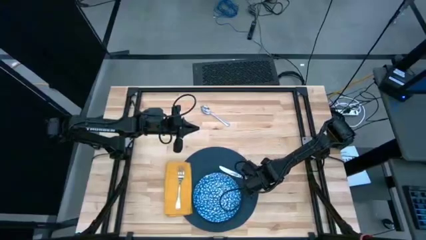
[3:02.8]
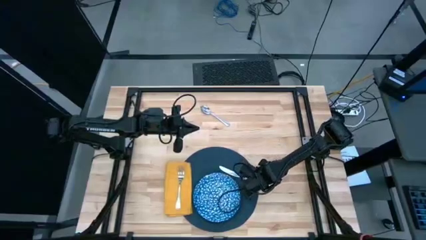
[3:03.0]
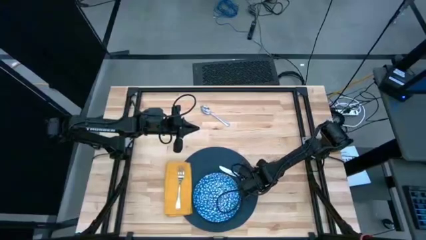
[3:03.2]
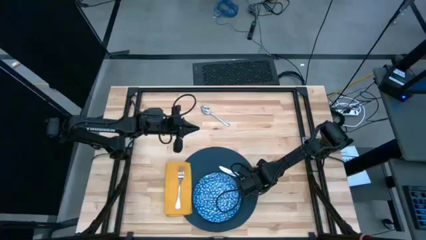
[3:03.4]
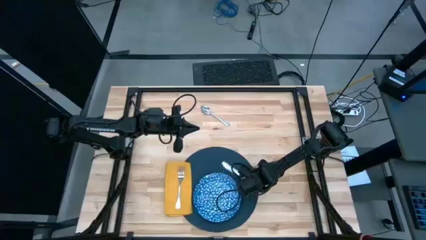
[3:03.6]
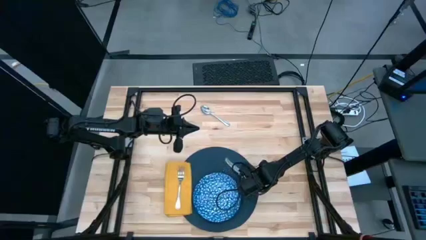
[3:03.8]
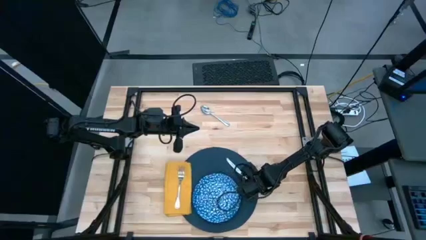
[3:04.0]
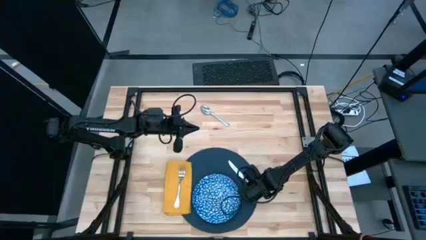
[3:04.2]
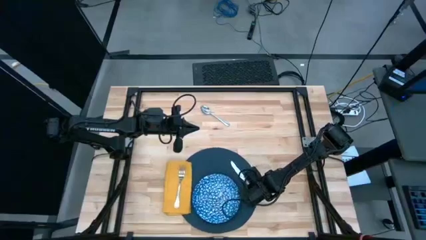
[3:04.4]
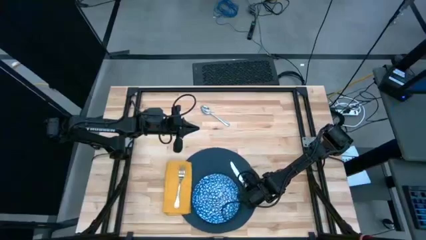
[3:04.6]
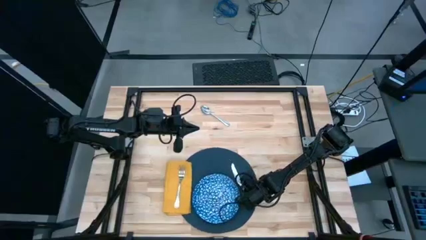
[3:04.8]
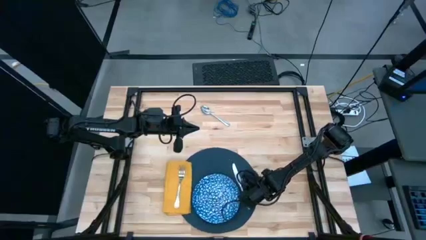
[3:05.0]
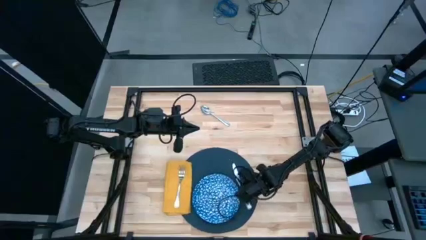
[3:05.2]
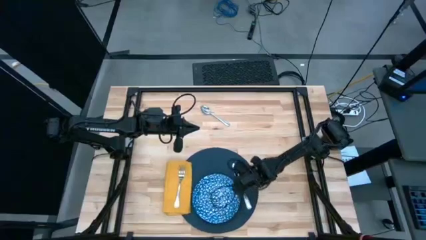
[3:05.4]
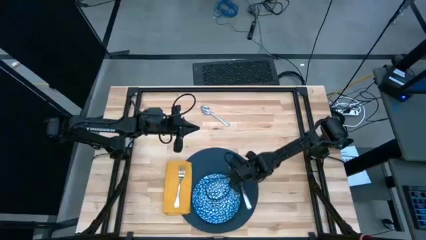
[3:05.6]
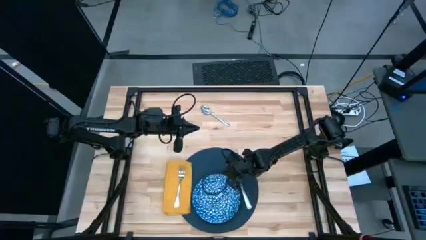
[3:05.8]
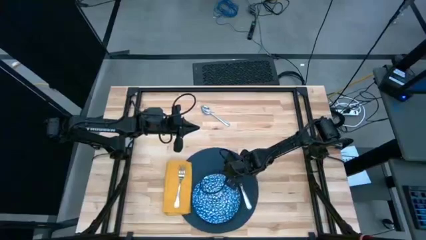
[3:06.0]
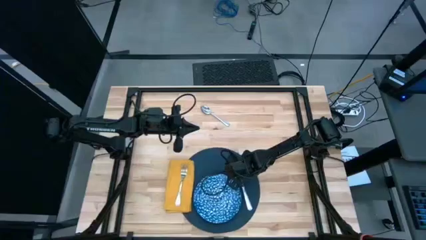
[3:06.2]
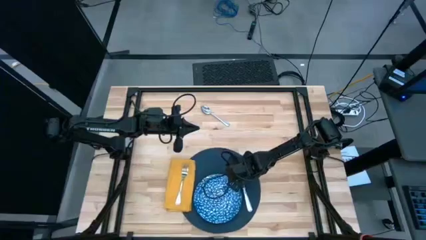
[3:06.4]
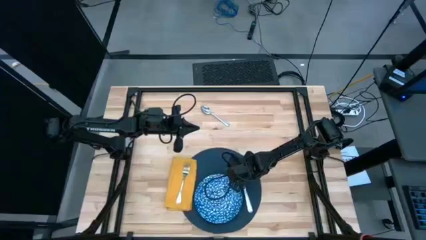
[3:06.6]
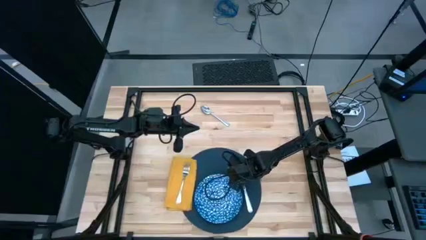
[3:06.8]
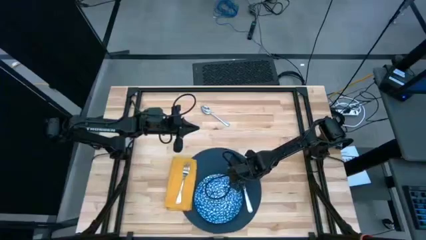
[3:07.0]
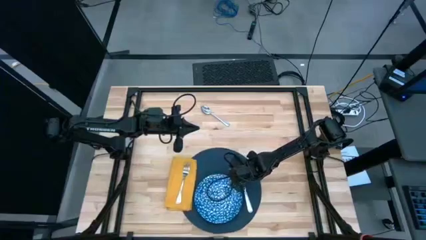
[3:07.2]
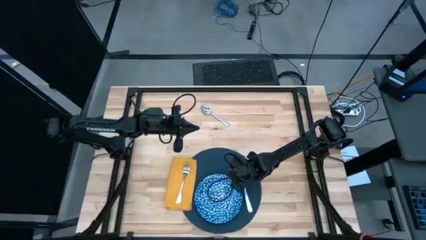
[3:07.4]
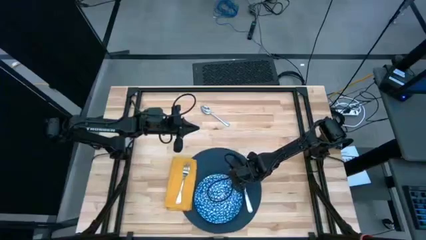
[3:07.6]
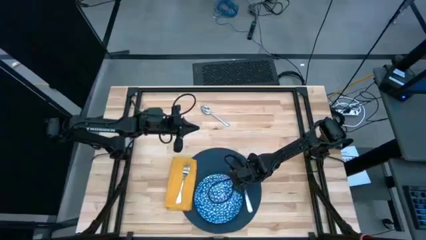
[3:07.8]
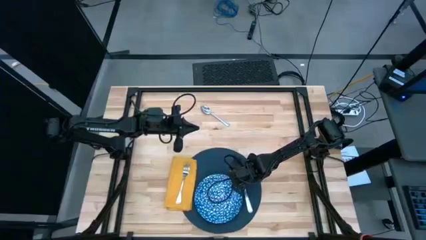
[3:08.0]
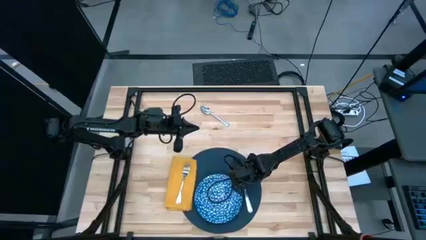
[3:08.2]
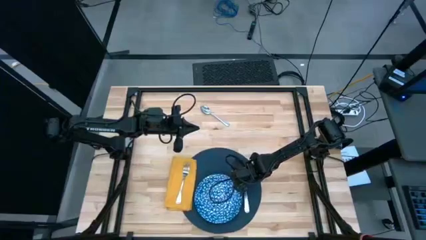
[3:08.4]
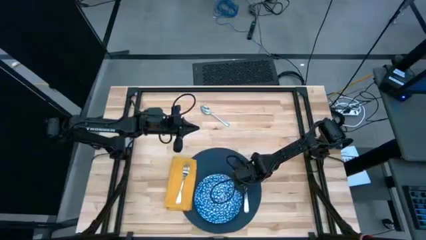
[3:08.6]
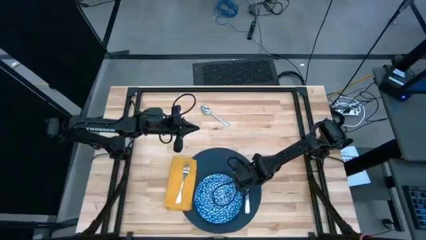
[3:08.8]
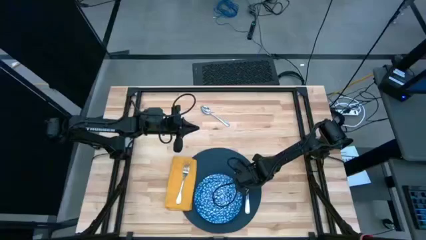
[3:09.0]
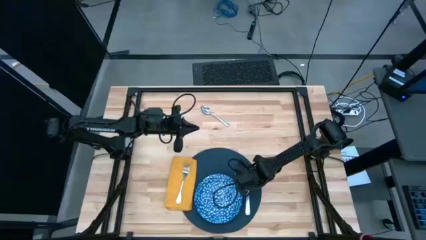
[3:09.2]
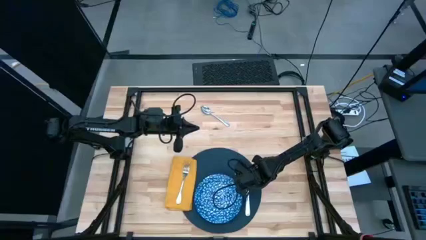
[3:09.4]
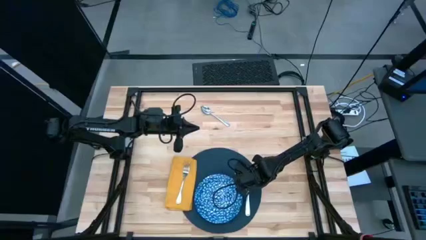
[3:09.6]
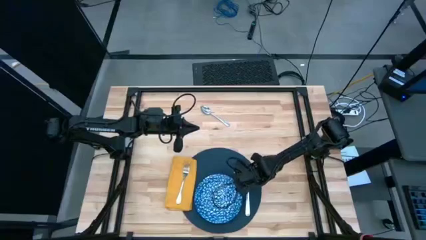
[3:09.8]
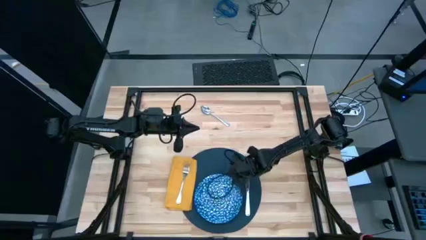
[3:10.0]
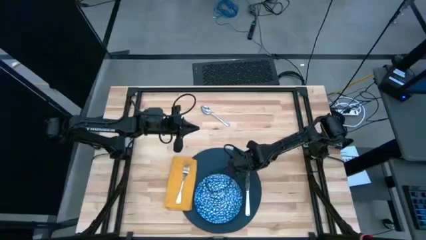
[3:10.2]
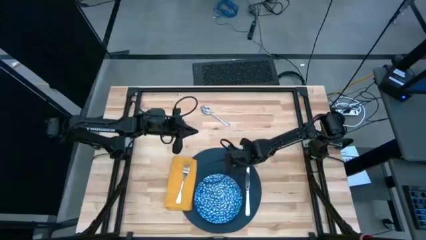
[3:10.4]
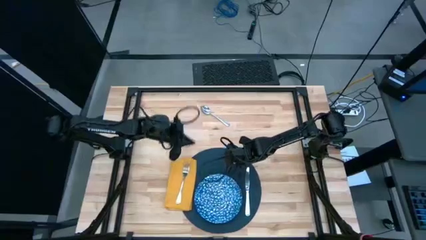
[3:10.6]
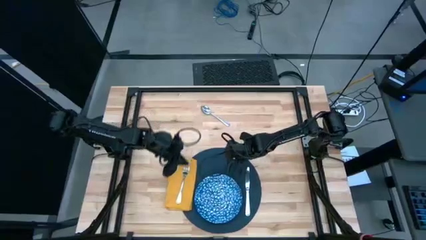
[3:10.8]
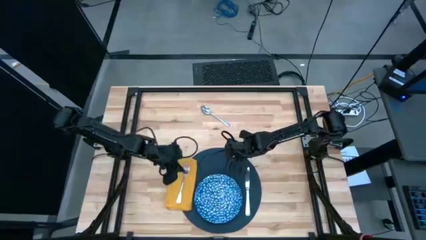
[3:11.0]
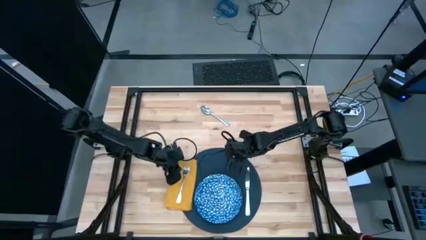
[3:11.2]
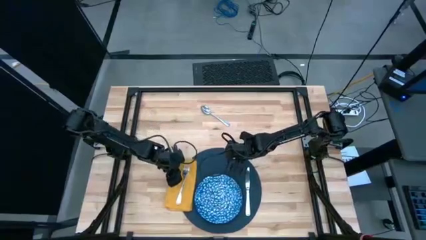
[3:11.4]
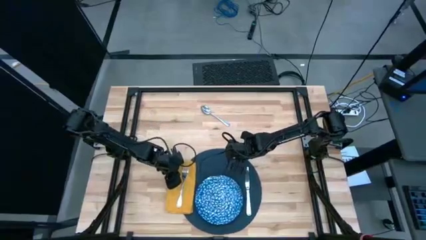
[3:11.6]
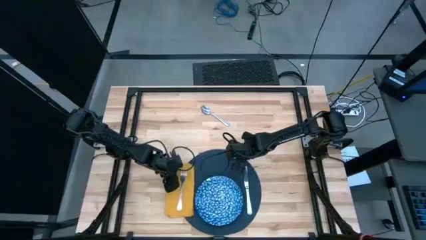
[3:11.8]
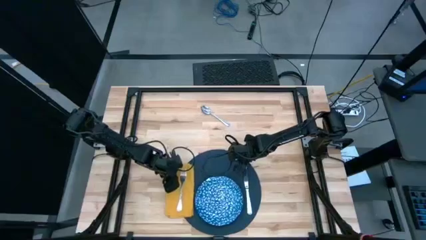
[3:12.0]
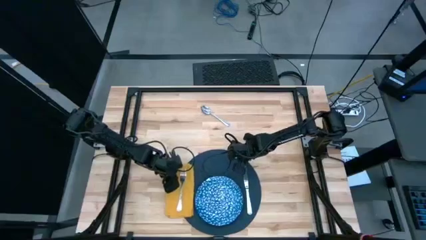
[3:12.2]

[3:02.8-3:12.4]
Task: Set table place
Adjust the silver table knife

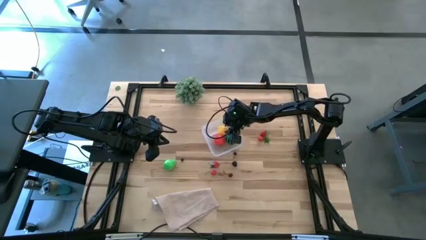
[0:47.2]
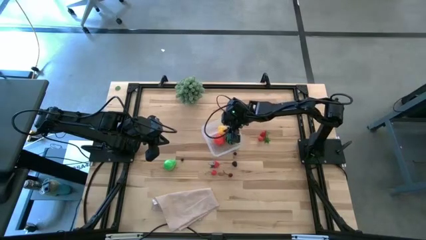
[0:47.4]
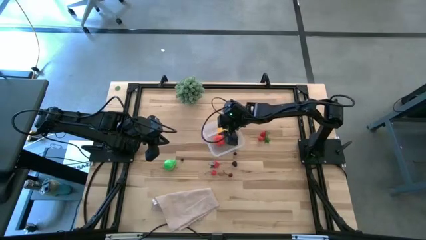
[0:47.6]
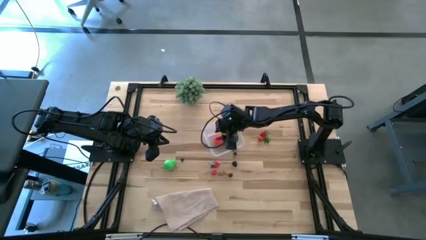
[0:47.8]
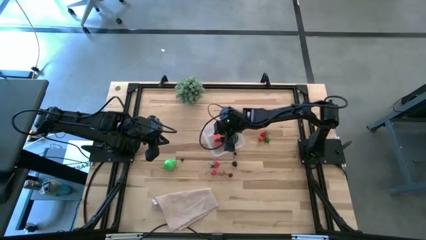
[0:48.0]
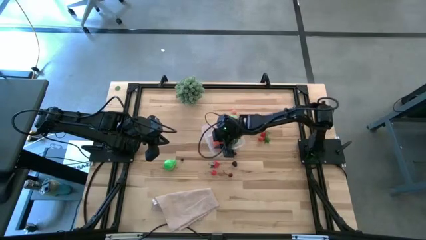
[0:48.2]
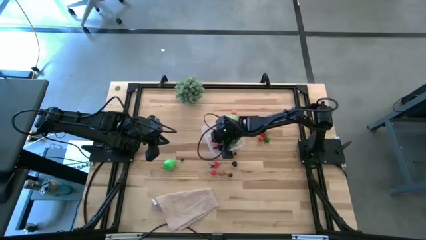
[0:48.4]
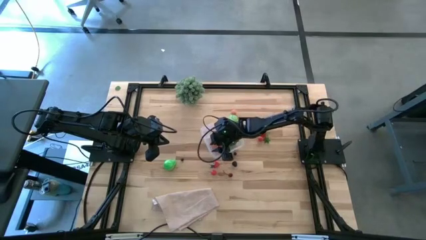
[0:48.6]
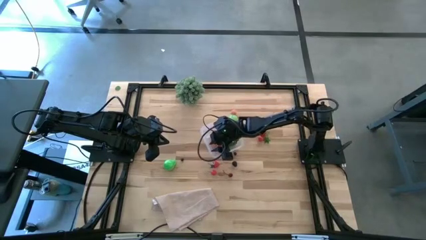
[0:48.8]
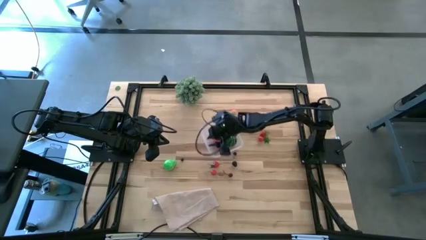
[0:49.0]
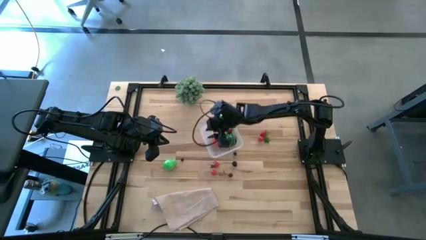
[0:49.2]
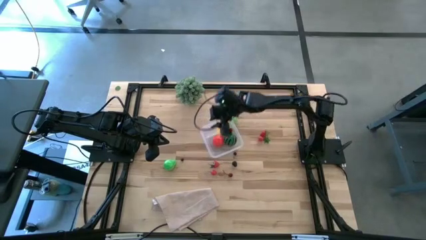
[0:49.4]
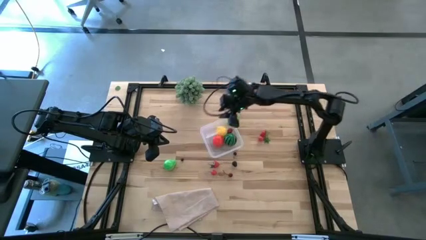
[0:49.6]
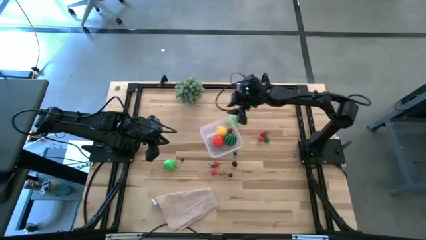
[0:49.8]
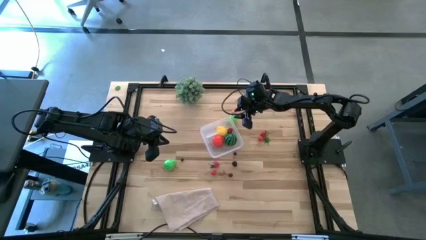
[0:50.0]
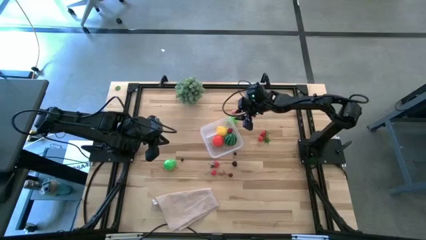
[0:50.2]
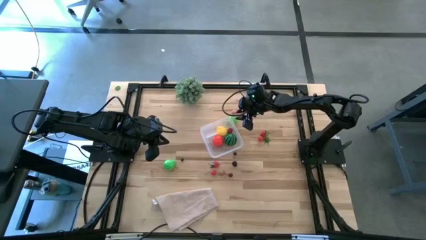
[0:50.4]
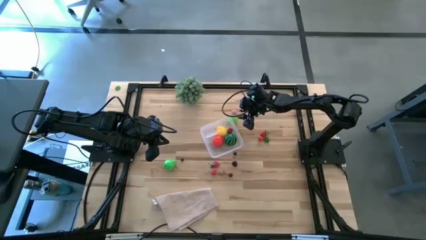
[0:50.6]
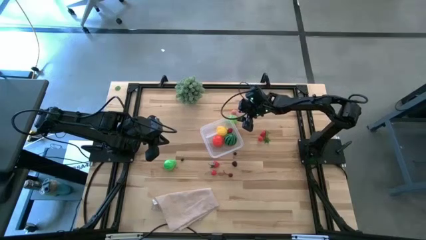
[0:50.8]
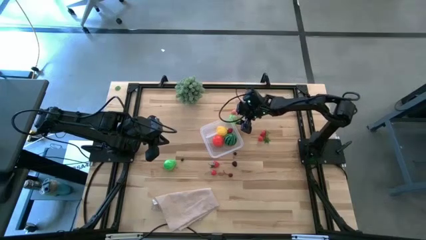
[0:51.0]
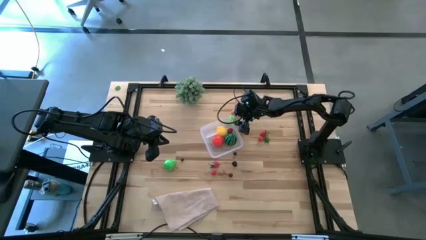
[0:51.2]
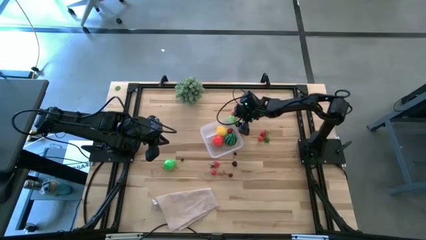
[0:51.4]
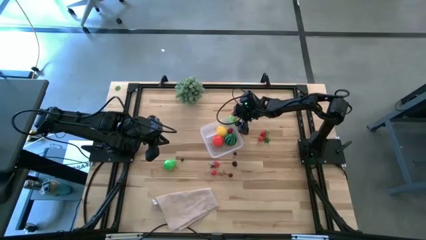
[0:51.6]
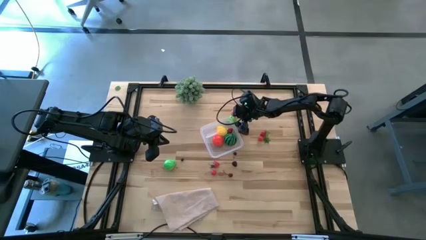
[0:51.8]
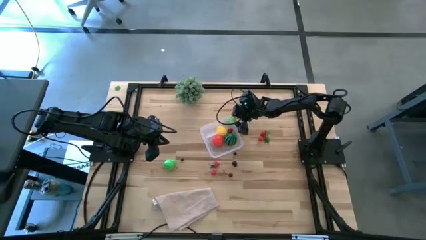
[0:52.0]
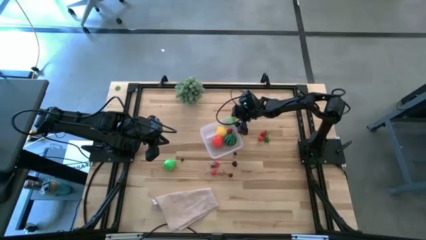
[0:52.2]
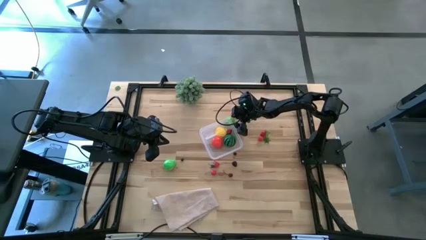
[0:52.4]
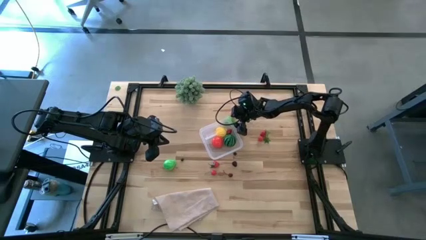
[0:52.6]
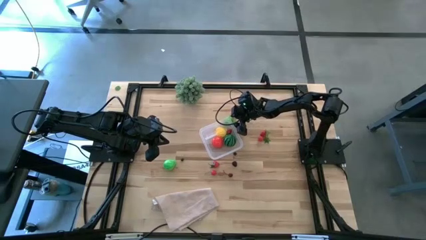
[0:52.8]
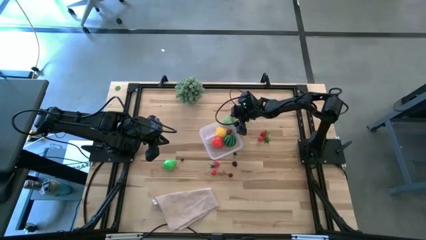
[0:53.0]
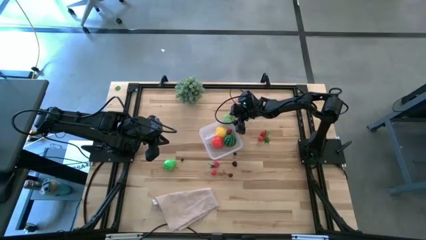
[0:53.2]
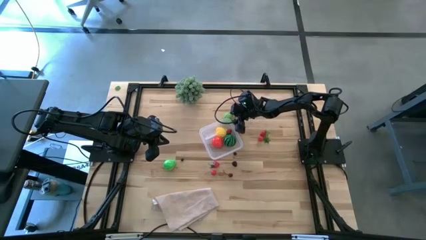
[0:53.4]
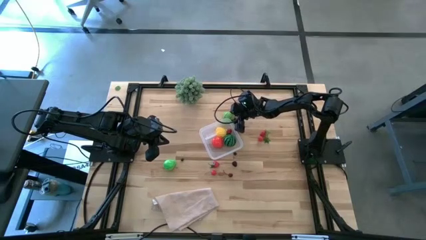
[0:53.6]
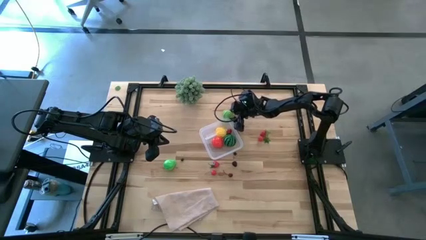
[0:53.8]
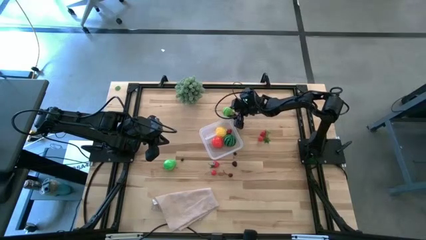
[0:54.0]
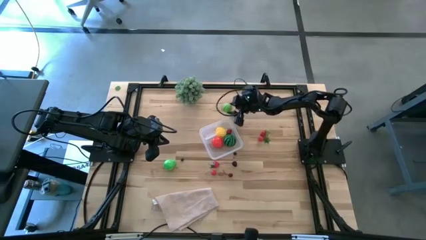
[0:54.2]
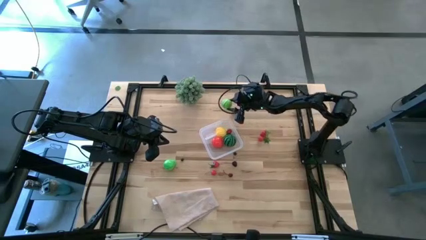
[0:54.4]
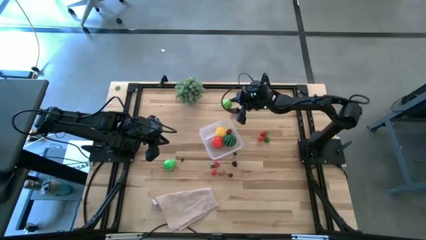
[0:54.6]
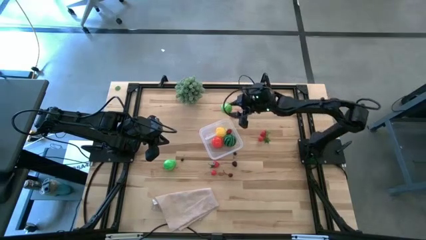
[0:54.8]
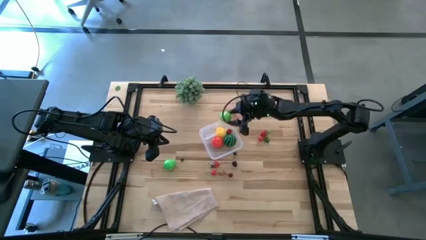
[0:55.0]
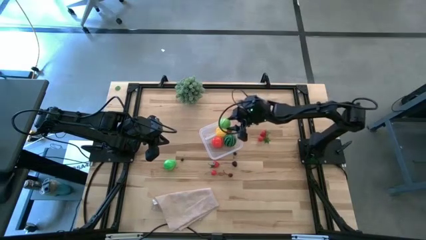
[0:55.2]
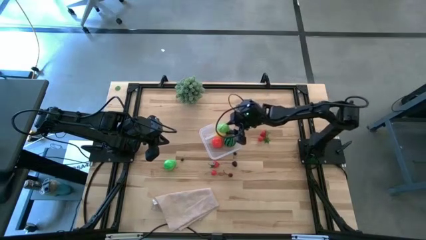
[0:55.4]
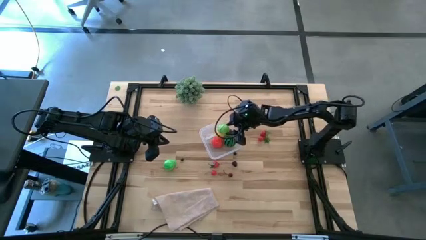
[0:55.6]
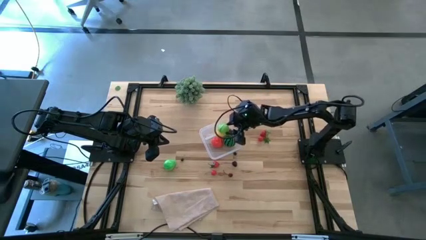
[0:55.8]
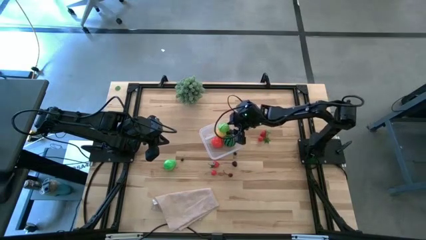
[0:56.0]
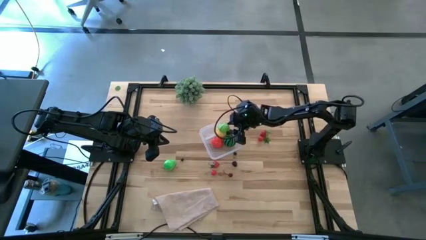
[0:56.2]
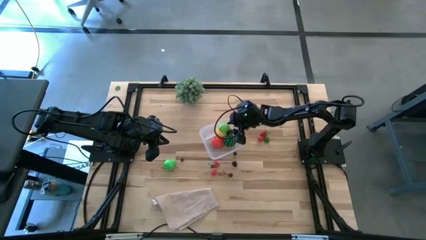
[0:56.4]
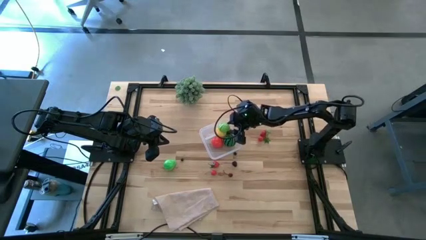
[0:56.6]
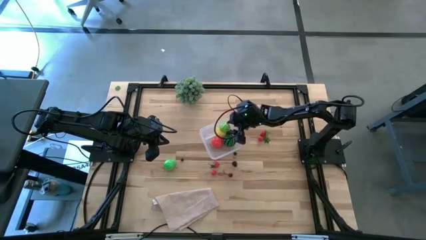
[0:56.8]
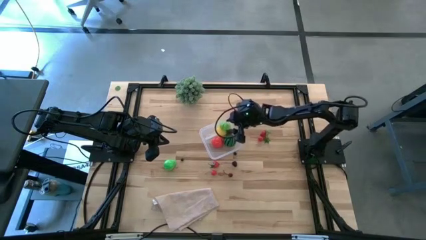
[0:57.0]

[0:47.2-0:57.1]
Task: Pick and placing Produce into tupperware
Put the green cabbage into the transparent bin
